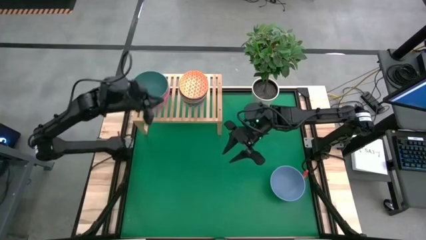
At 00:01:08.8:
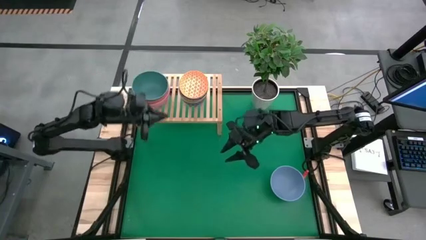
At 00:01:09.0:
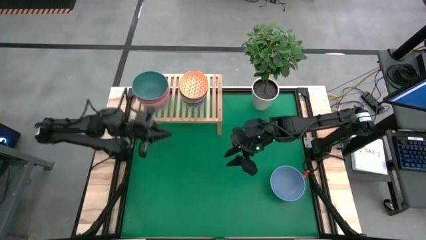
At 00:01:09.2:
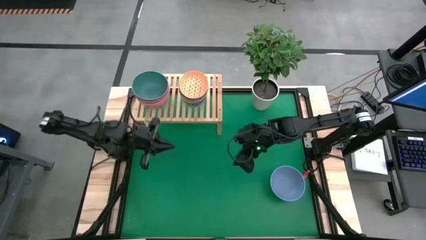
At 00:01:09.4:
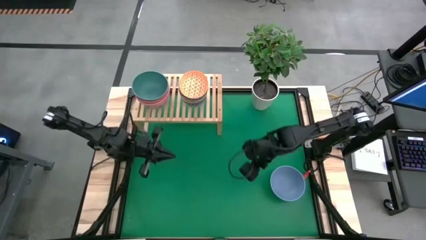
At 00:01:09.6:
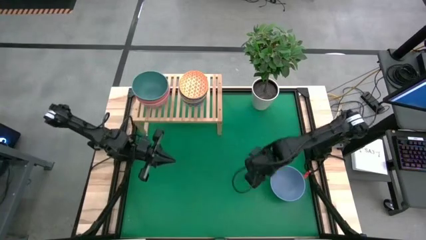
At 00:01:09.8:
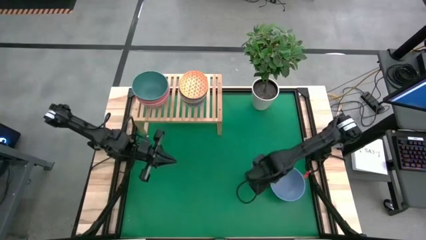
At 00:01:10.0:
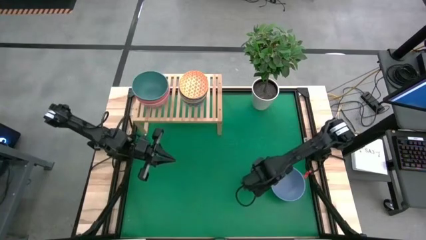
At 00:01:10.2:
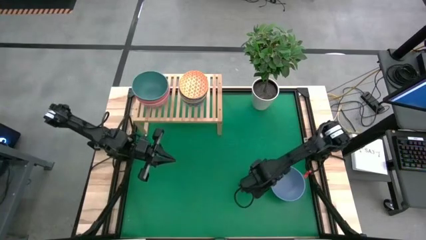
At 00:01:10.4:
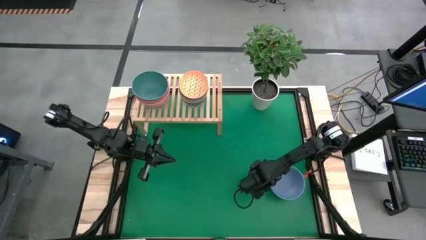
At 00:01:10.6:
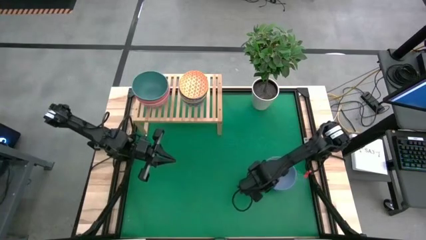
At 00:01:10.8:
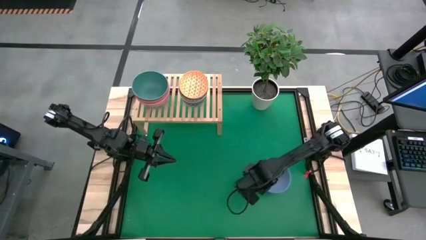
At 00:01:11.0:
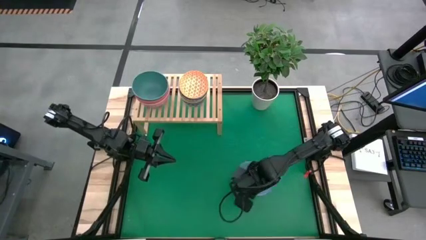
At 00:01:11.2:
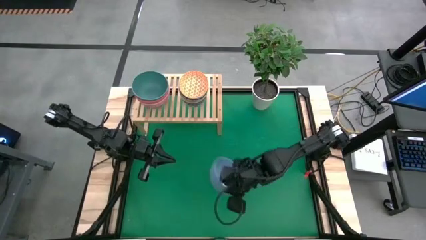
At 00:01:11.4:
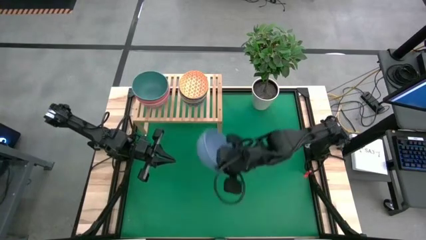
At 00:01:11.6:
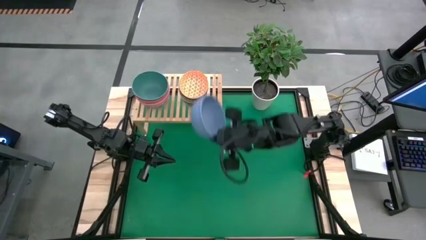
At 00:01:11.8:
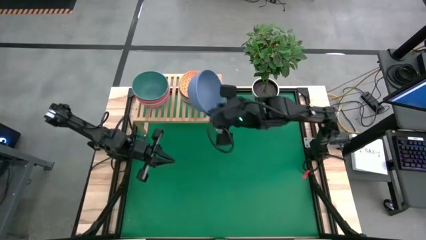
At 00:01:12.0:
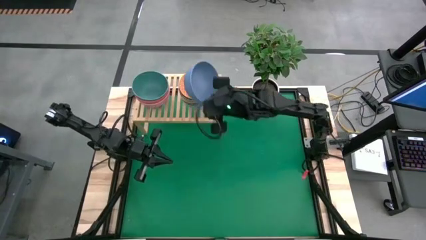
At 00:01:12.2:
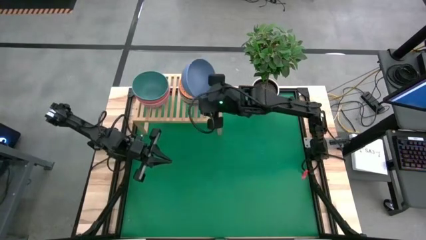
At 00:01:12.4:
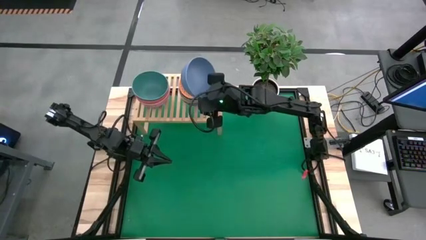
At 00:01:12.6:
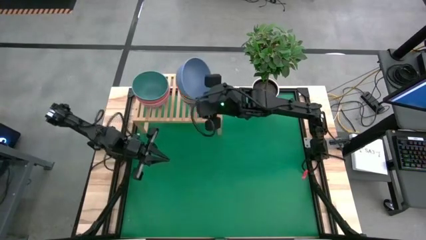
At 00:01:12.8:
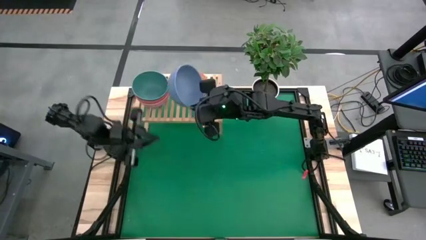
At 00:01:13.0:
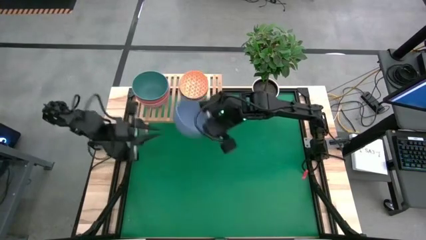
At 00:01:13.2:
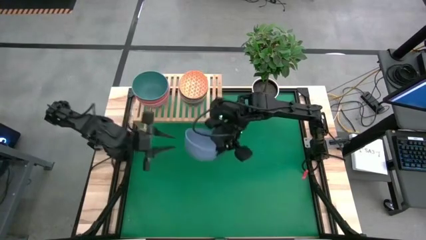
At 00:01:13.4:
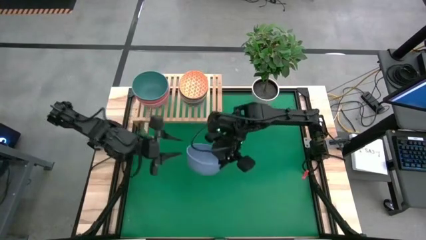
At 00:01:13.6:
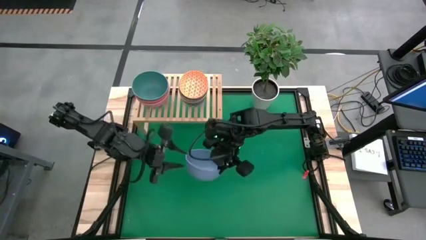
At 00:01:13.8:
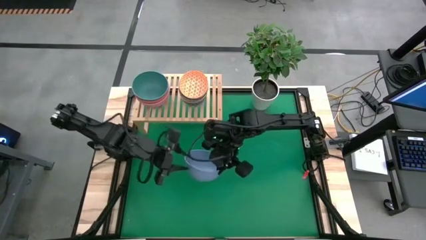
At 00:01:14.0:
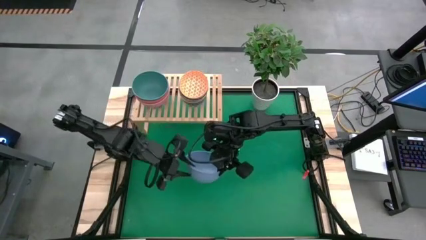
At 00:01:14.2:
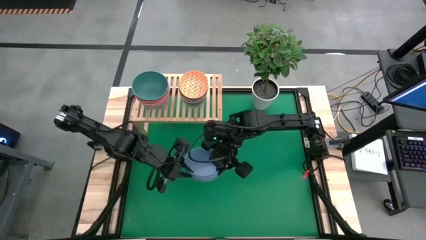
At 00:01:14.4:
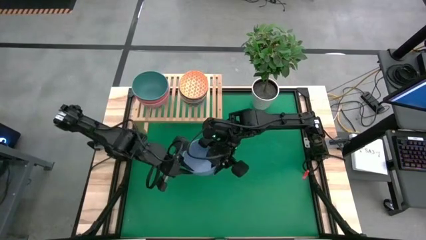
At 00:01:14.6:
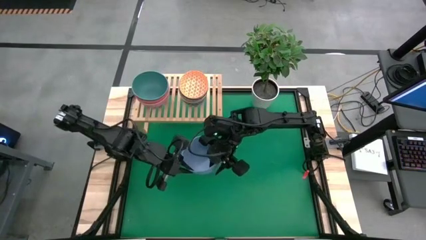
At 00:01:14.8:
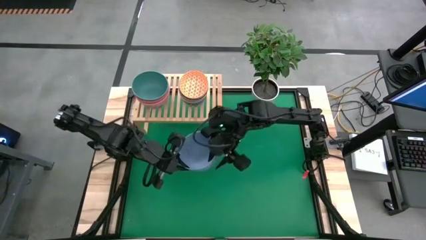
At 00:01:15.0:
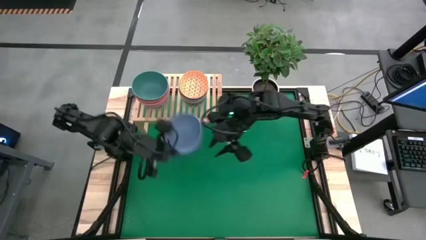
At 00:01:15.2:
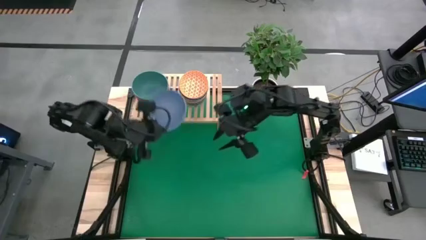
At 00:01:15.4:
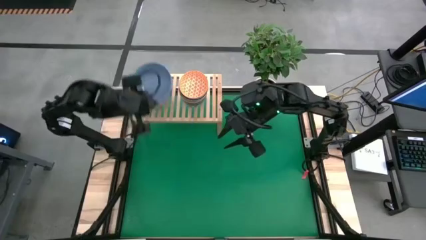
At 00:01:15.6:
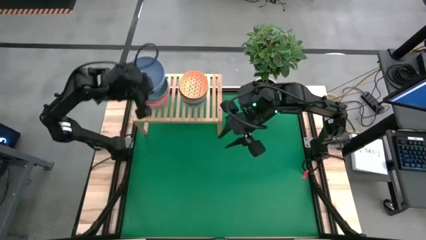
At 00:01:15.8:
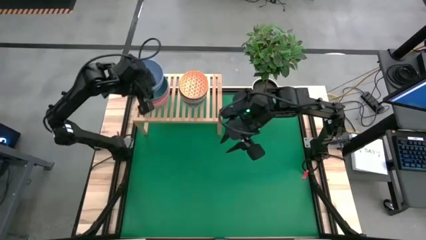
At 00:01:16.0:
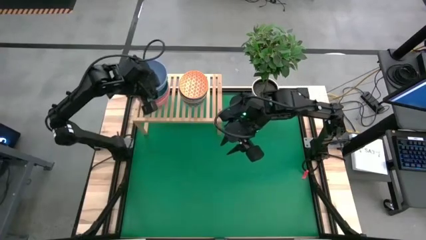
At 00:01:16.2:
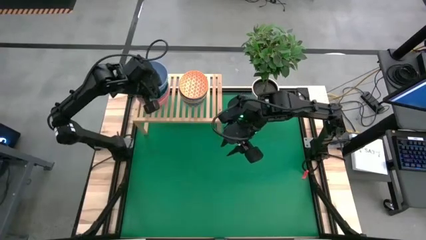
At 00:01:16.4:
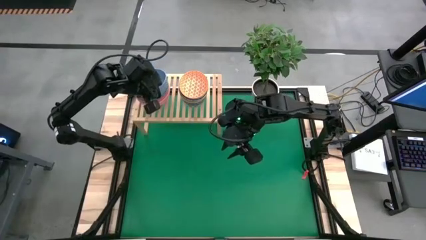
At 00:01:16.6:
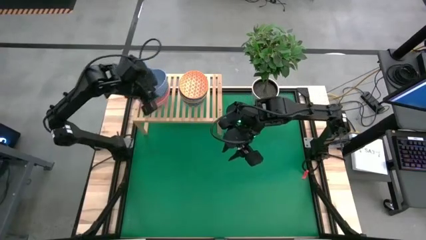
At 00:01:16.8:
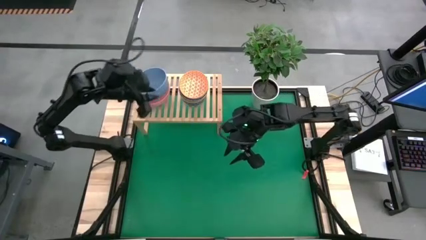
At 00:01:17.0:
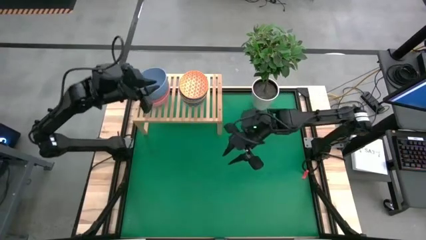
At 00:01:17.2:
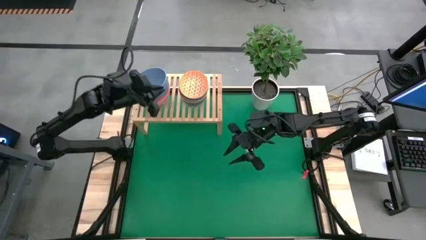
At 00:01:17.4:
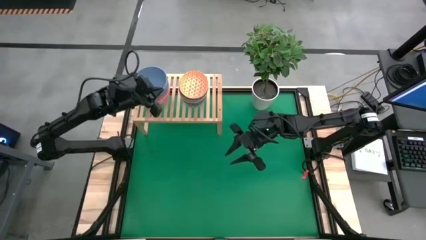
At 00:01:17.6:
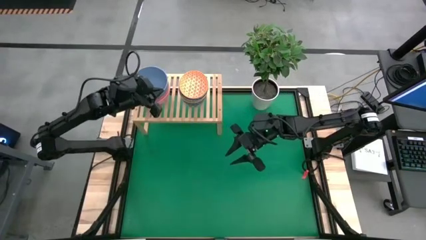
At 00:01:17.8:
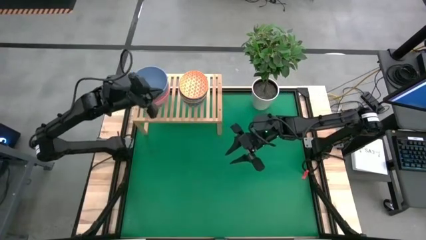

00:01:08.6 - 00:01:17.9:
Task: Place and stack bowls onto a shelf
Stack the blue bowl on top of the green bowl on the shelf

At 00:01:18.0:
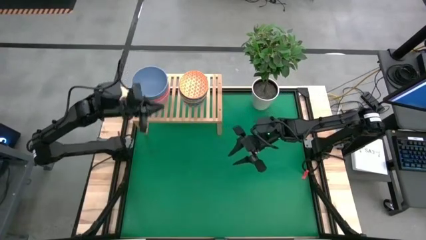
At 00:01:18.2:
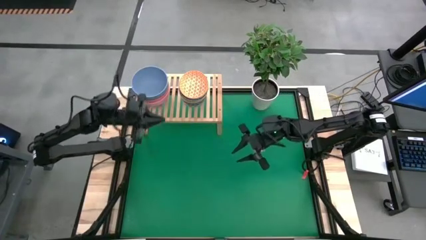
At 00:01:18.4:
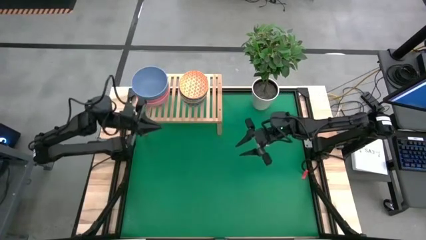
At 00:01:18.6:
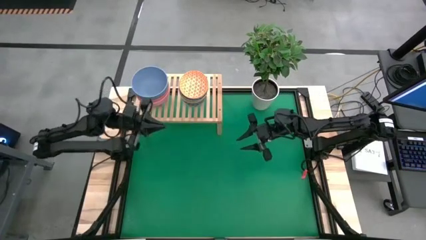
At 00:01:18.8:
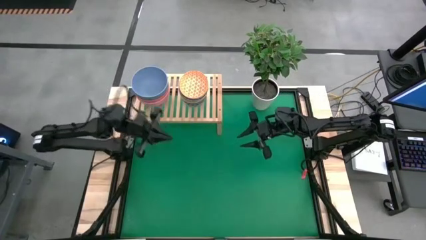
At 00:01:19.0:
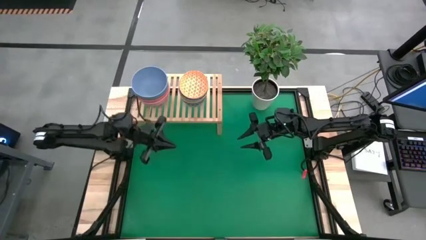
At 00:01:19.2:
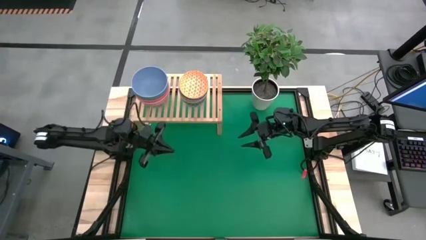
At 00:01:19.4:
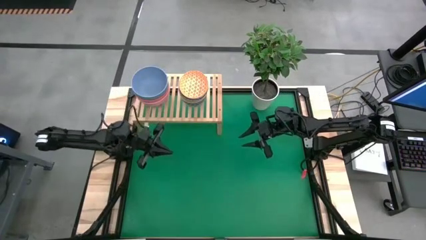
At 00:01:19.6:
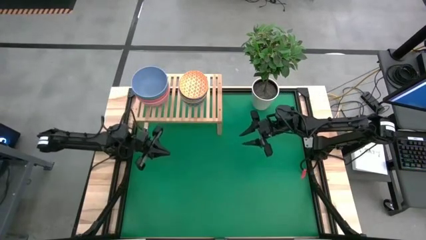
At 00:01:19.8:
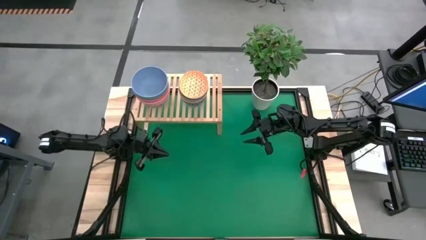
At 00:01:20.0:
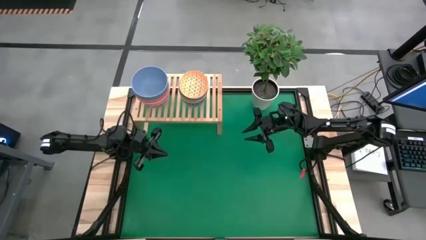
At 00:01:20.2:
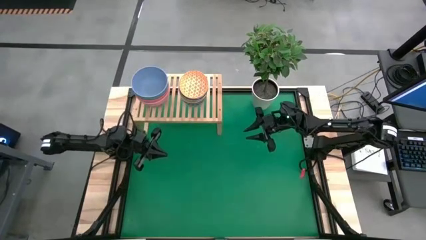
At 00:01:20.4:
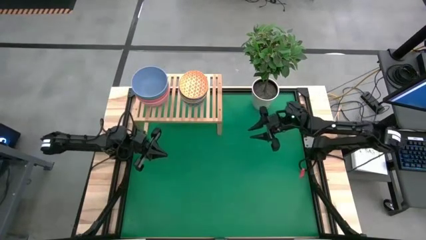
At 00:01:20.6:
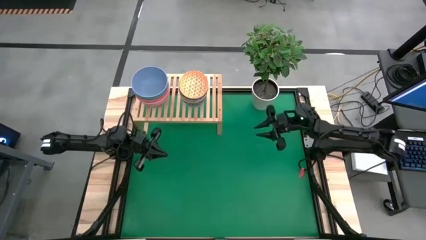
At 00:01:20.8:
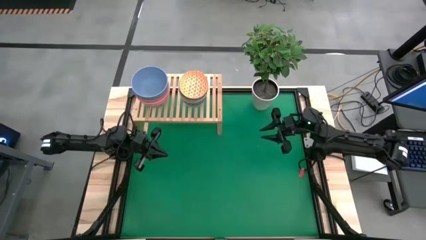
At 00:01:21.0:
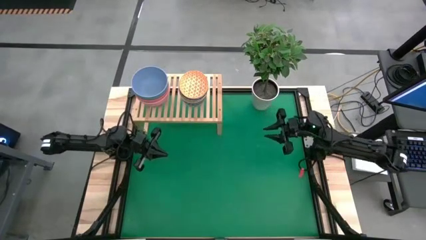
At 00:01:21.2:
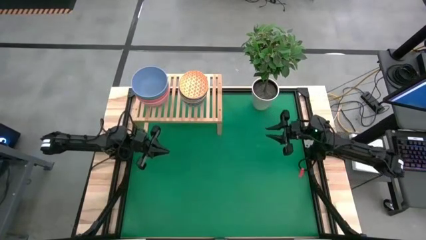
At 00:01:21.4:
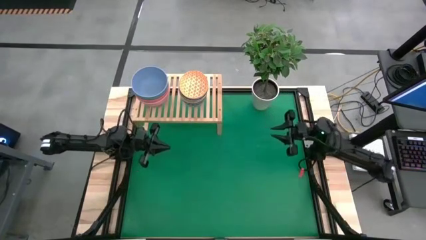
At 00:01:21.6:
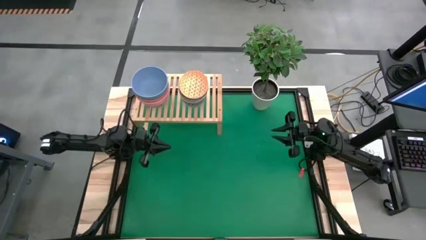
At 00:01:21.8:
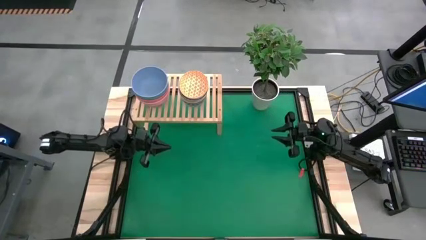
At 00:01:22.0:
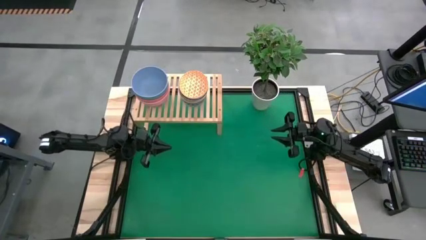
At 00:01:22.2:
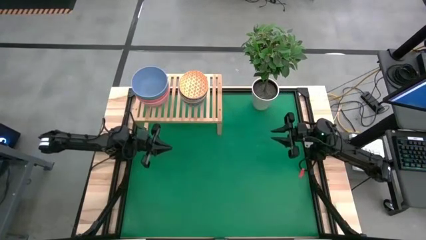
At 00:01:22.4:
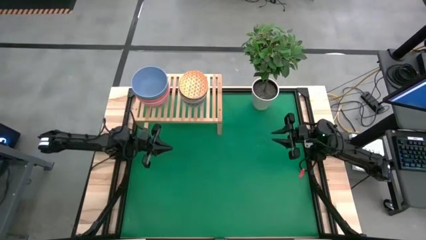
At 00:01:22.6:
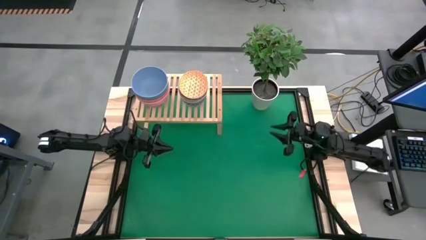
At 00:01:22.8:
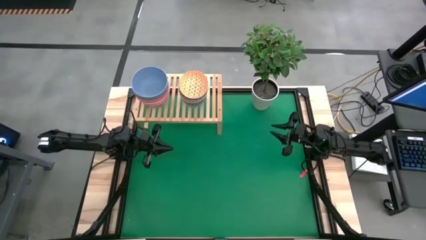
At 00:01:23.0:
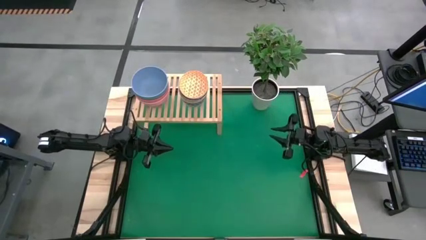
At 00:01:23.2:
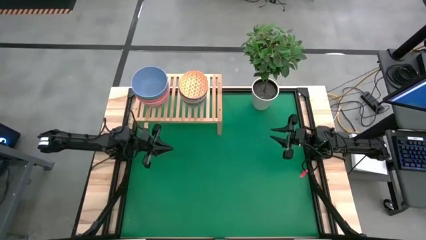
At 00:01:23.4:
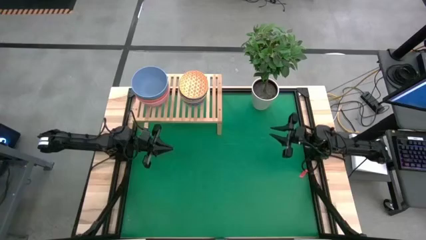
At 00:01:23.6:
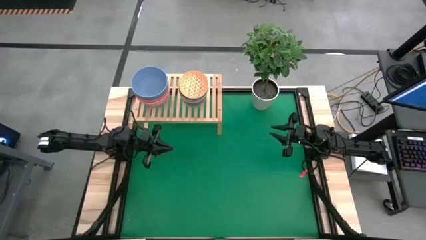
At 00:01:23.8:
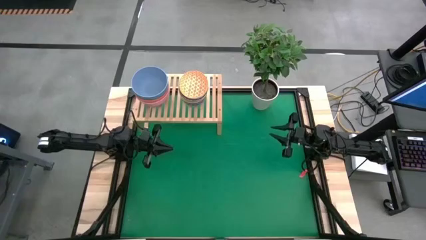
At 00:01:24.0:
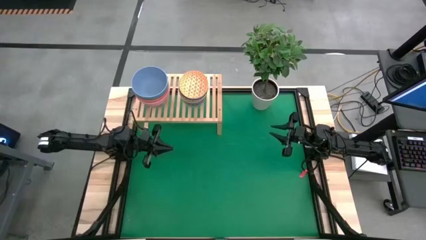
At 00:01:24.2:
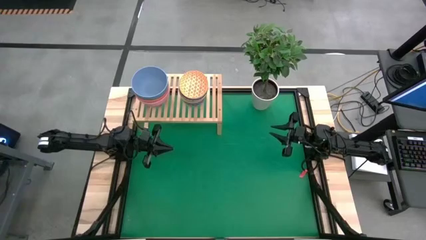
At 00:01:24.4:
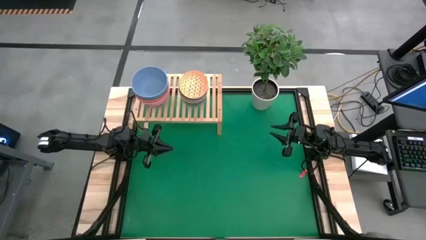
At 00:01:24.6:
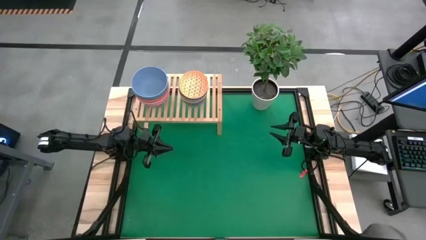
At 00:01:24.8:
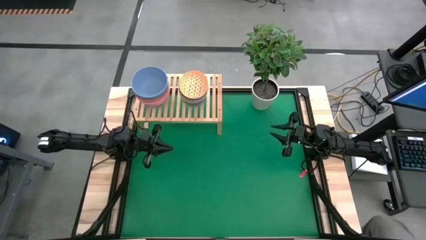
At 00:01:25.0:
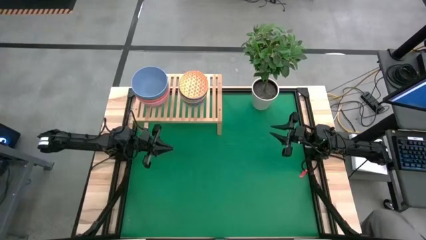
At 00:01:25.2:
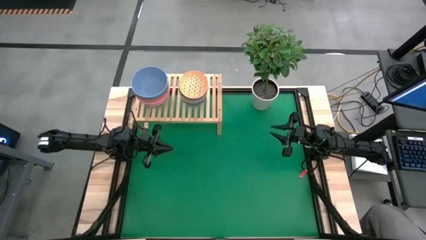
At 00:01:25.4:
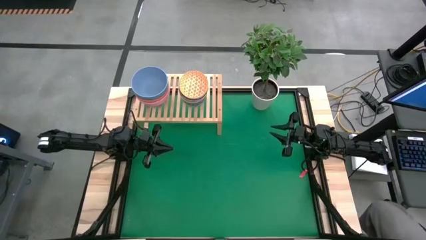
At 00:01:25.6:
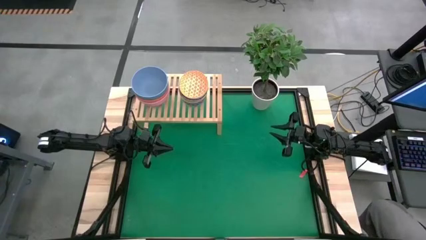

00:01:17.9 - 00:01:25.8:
Return to Home Position
